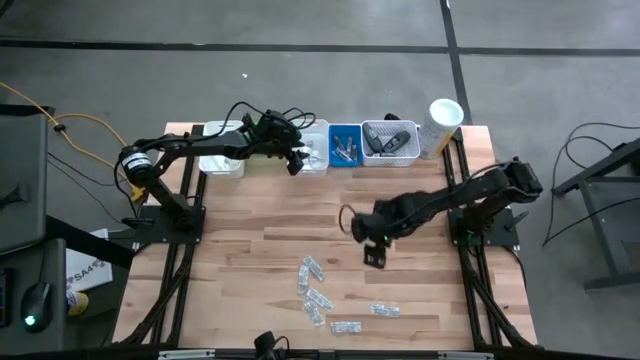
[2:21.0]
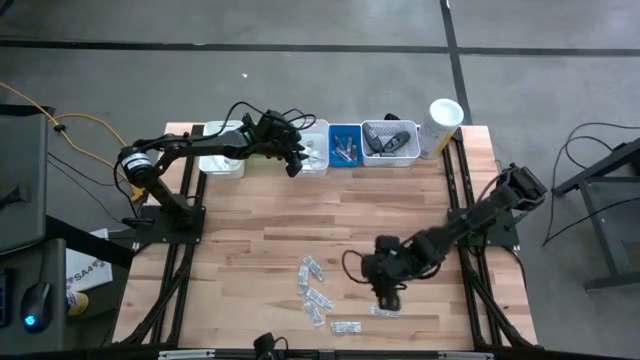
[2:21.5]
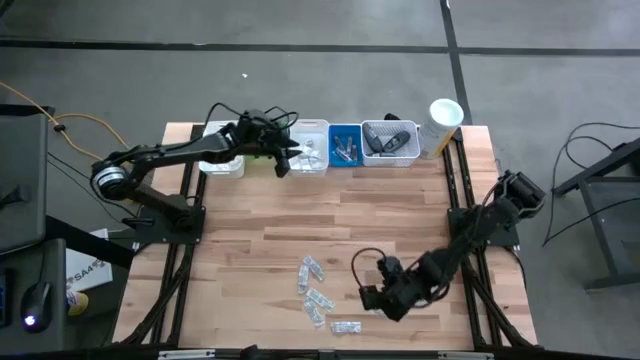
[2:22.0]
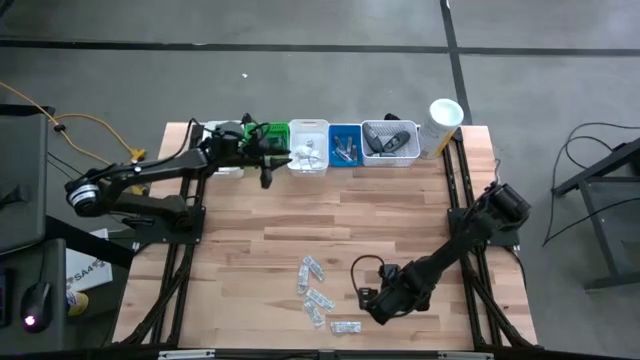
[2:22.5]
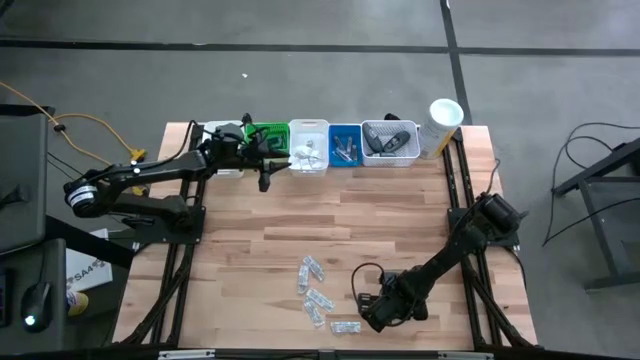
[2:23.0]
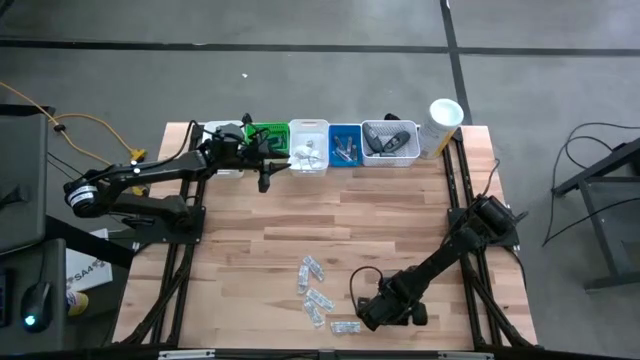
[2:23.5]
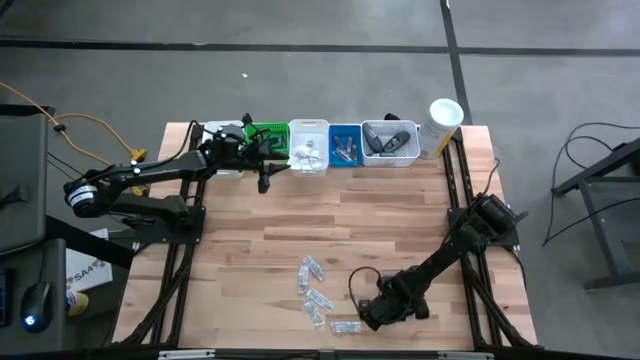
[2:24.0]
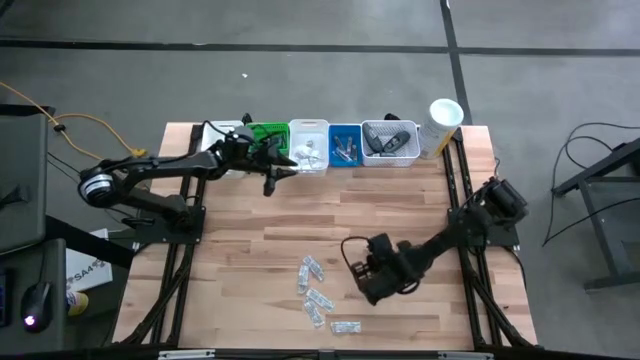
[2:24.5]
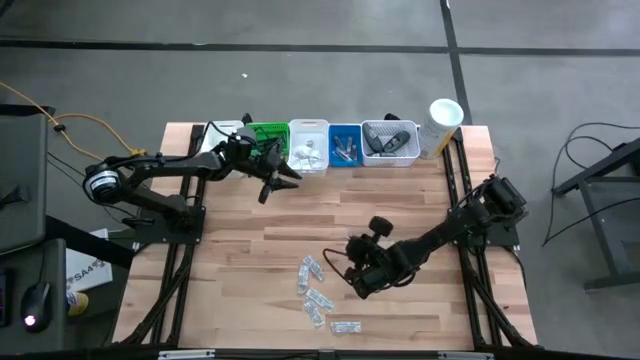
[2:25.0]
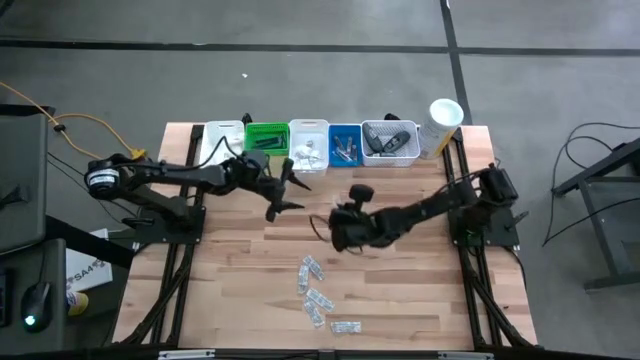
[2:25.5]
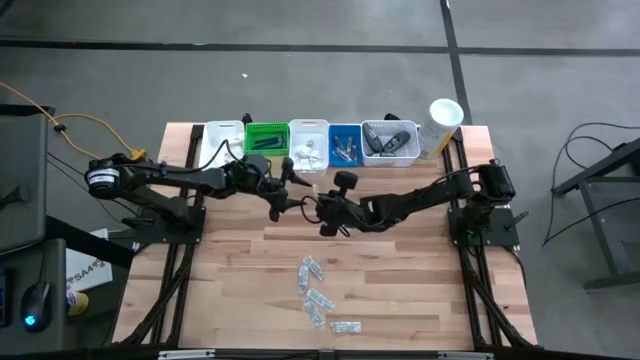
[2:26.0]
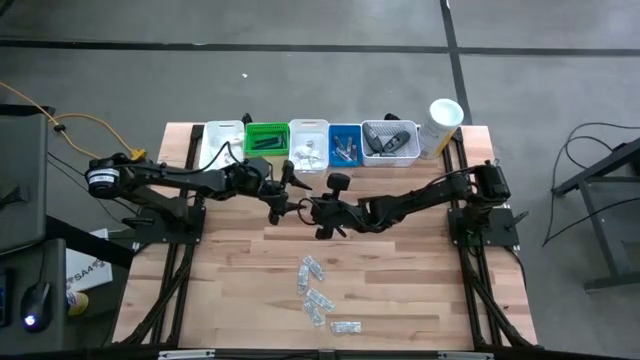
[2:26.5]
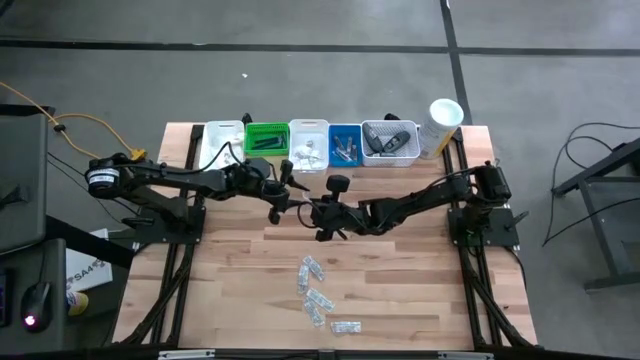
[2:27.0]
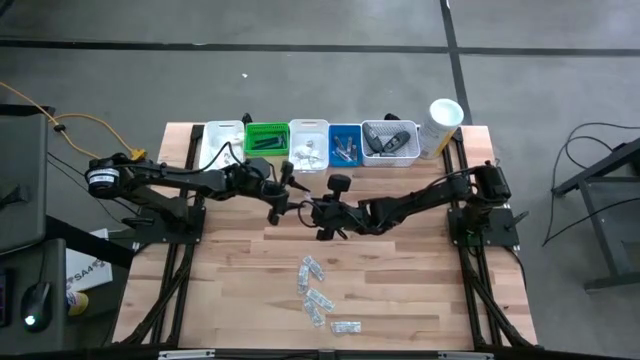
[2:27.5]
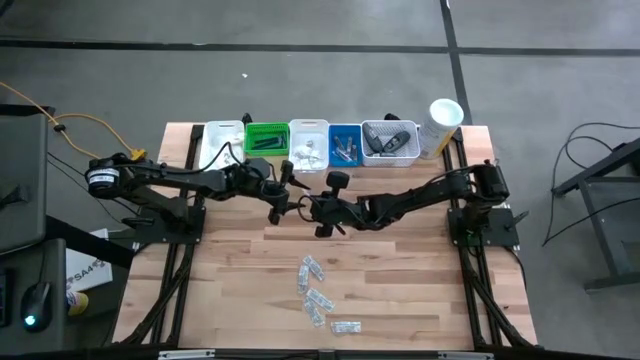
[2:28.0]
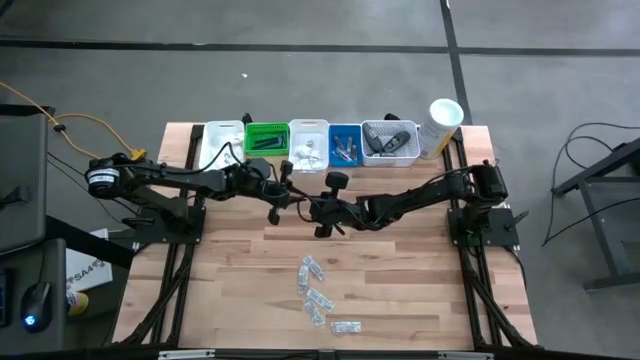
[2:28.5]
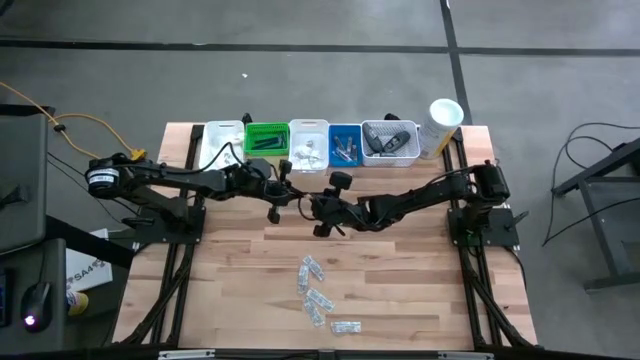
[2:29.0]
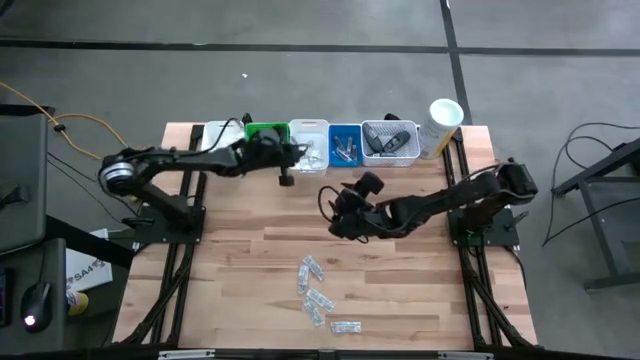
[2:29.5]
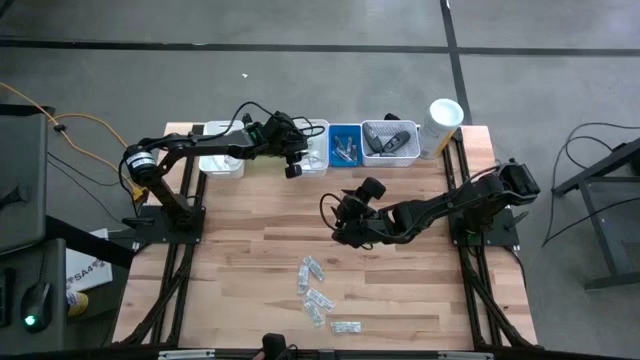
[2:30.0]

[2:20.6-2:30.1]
Task: Pick & Place Travel size toiletries
Put the white bandage into the middle white bin

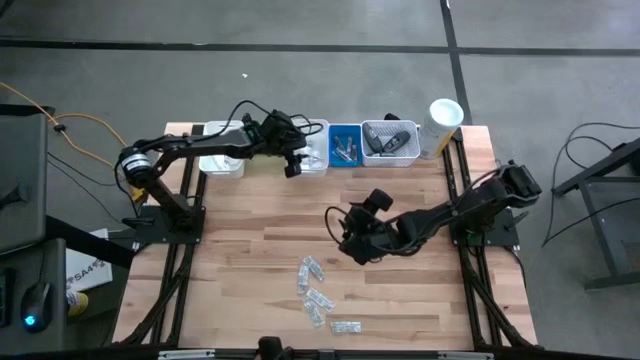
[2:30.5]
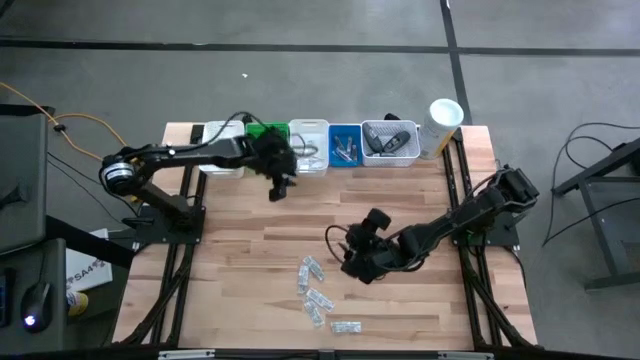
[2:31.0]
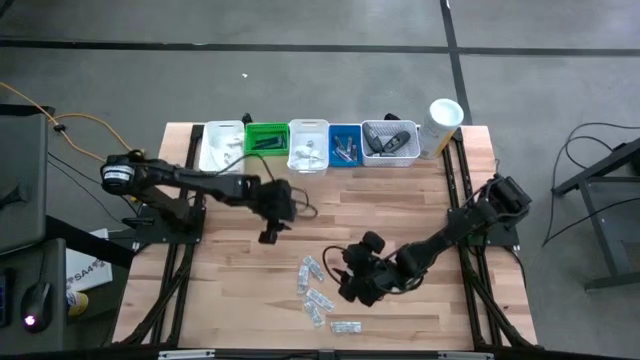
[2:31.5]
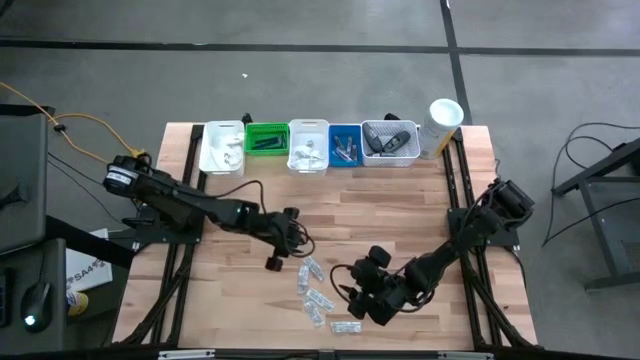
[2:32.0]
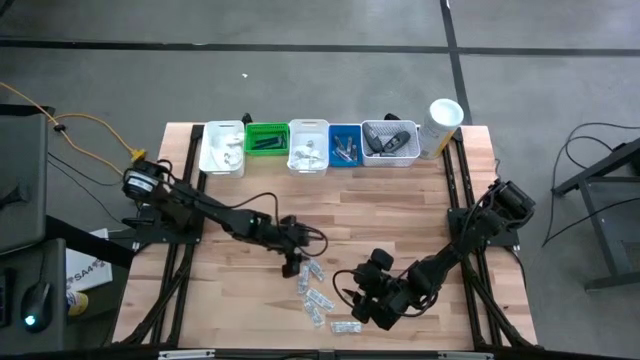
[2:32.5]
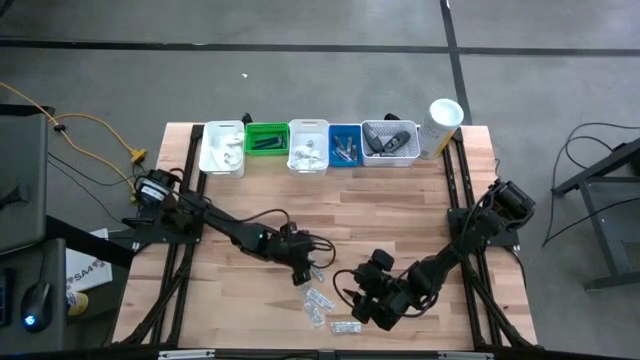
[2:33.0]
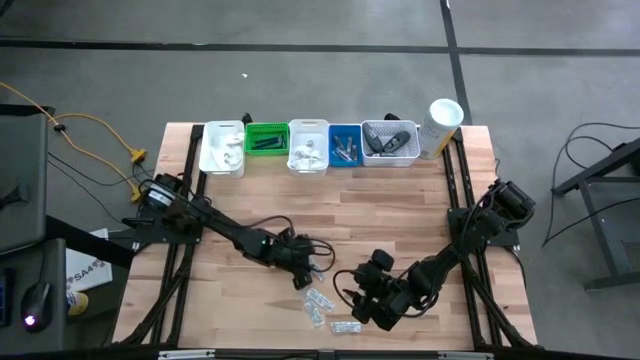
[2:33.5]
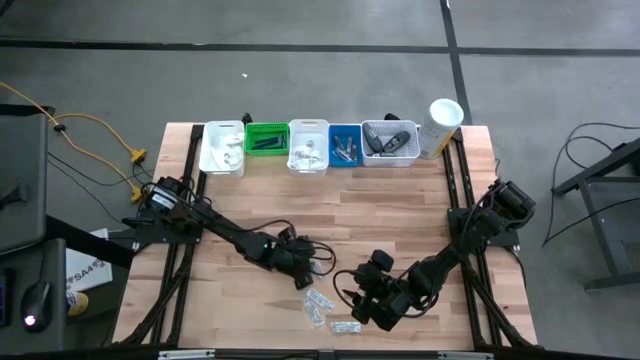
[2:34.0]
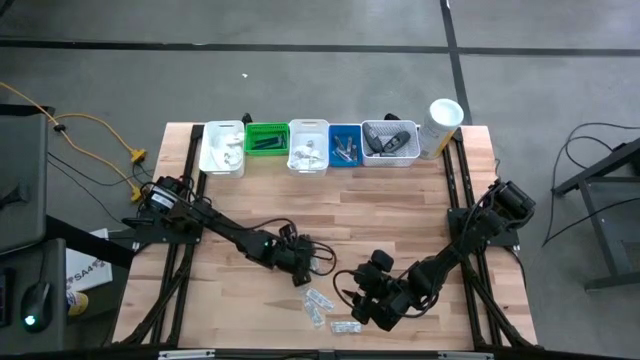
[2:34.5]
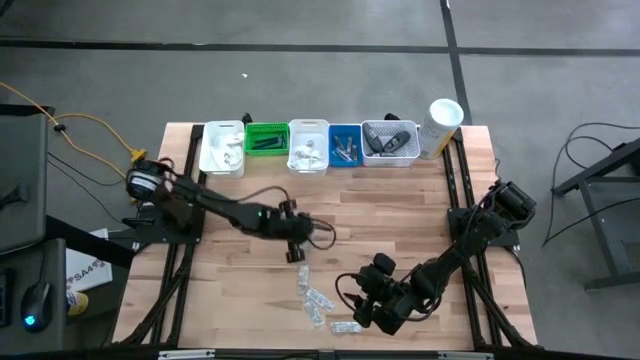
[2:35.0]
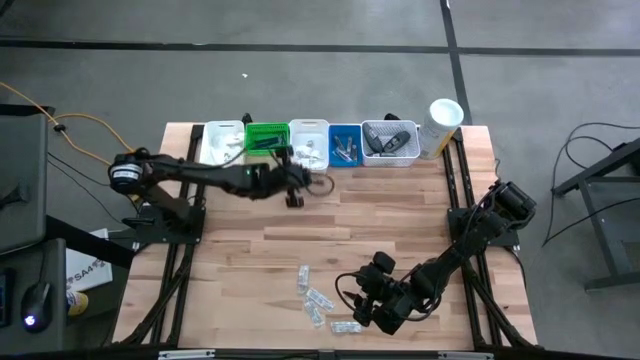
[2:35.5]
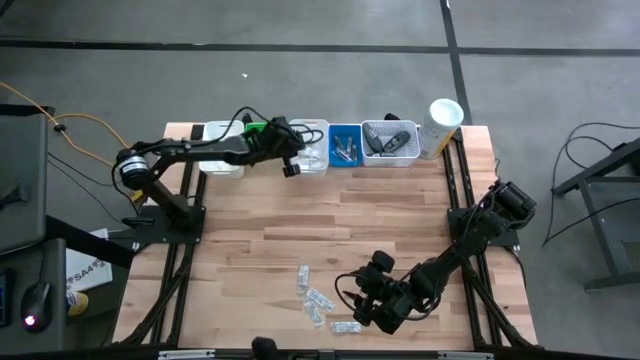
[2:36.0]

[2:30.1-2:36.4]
Put the white bandage into the middle white bin

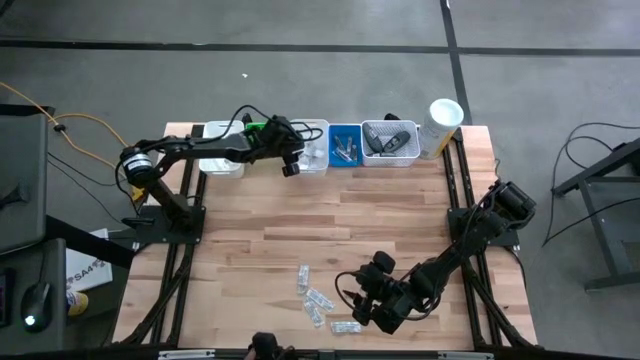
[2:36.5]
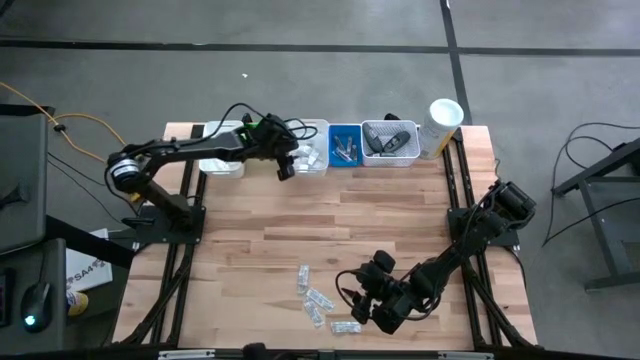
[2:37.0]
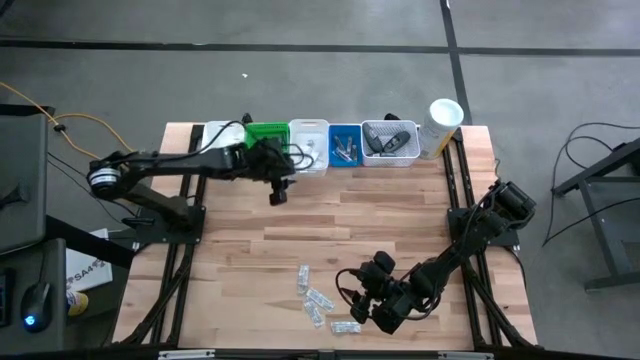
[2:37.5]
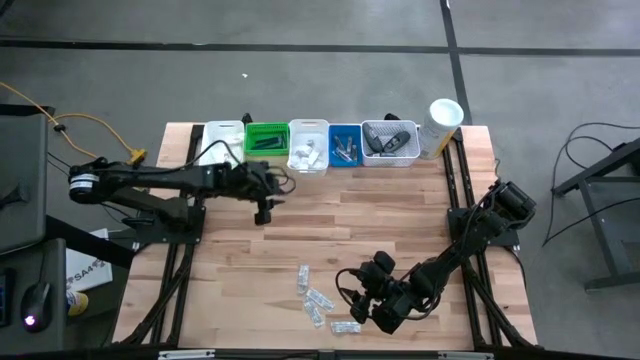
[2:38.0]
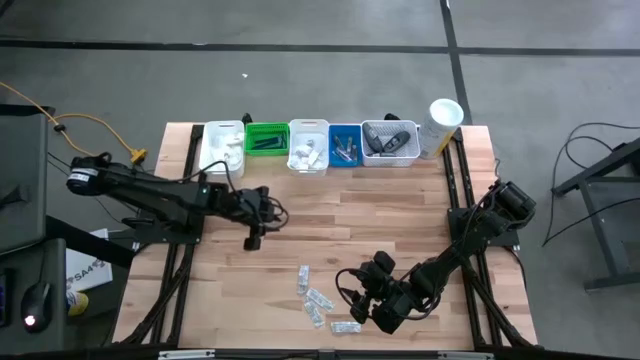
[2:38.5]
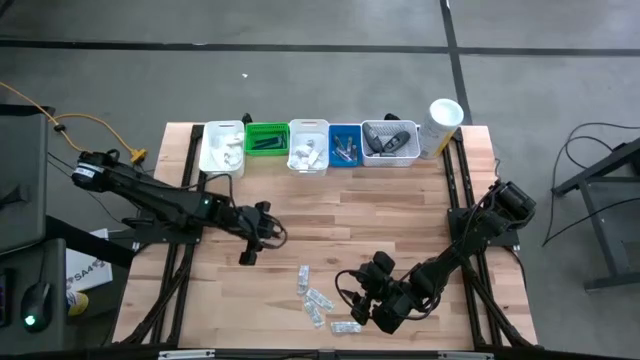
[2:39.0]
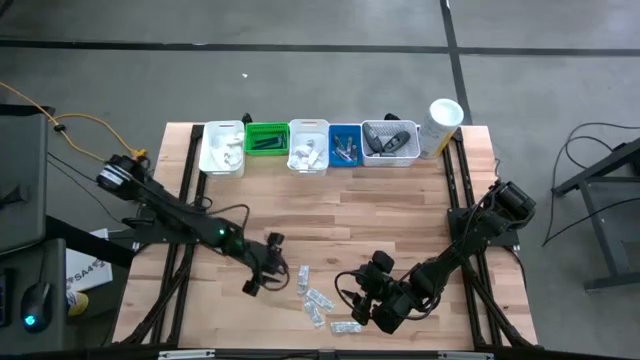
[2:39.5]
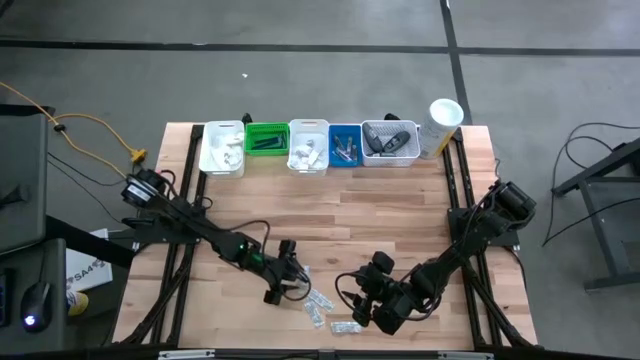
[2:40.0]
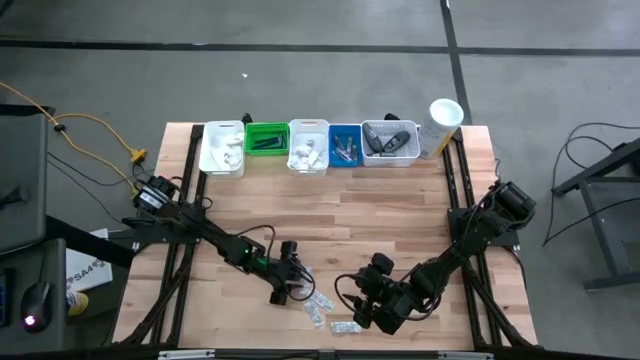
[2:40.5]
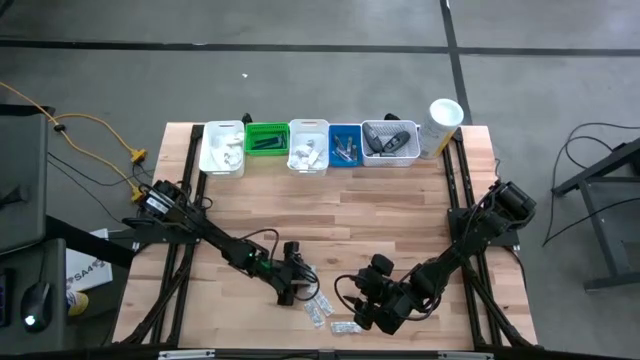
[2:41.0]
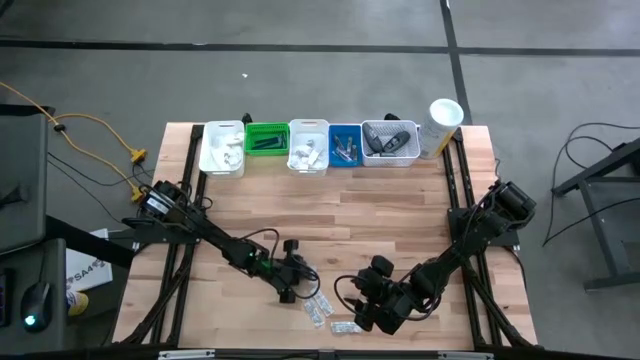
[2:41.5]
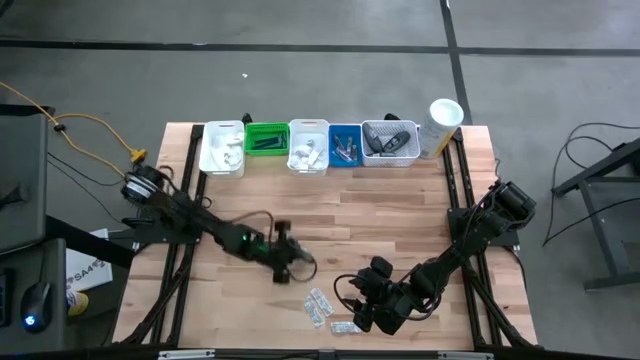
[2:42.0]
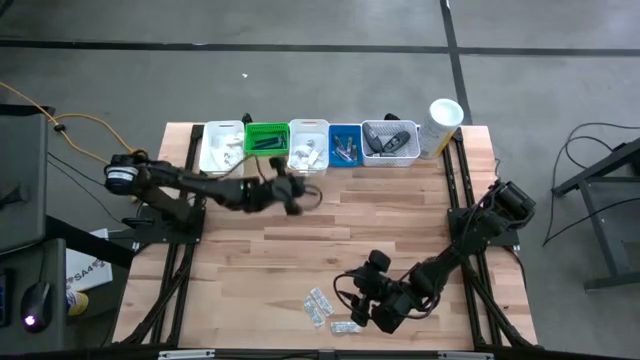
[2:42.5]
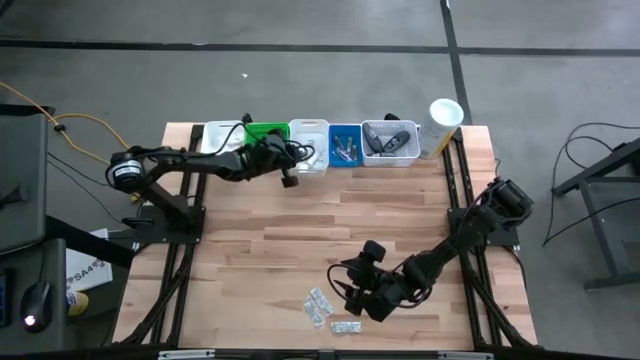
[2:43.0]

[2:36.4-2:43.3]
Put the white bandage into the middle white bin
